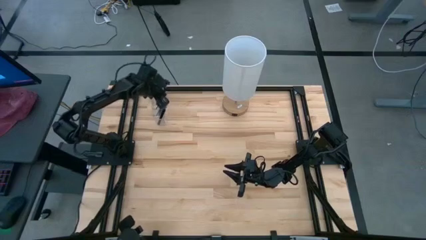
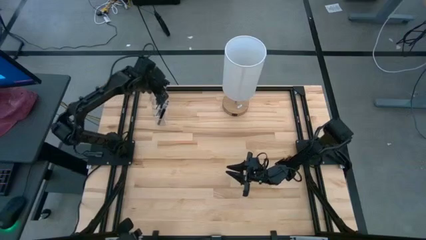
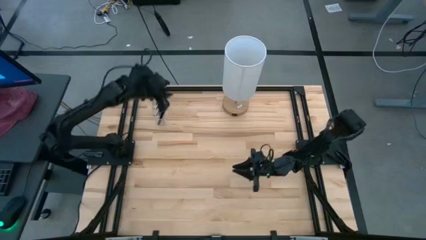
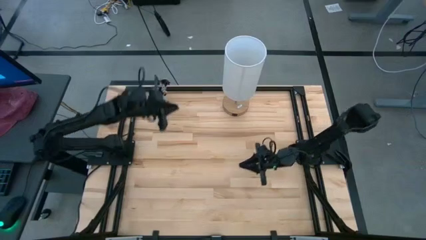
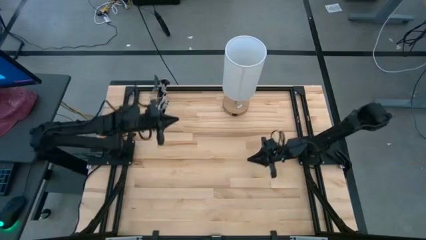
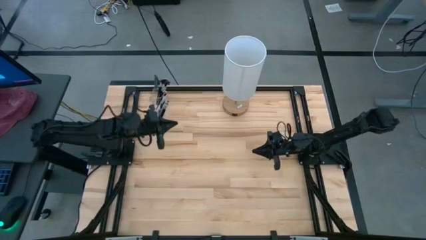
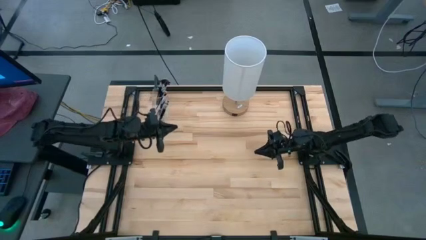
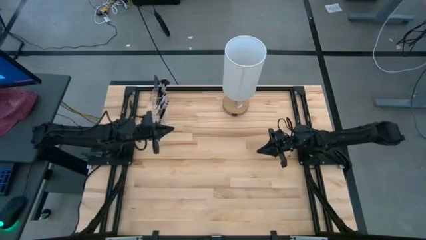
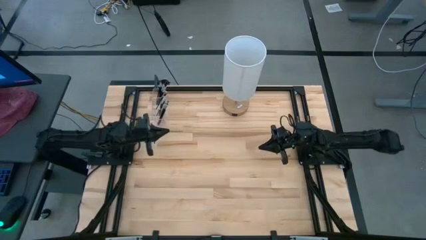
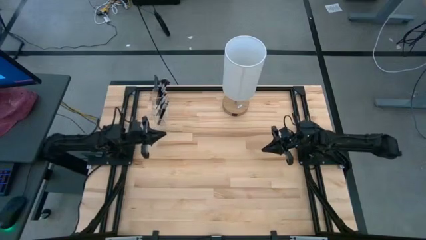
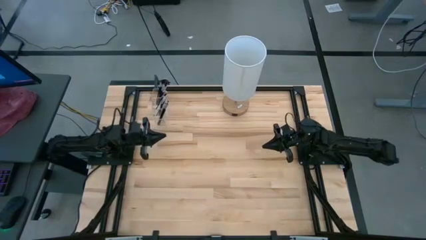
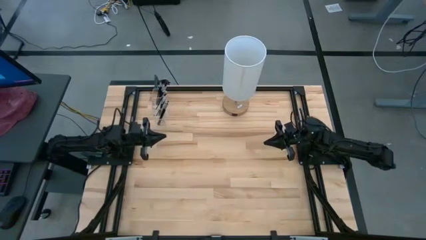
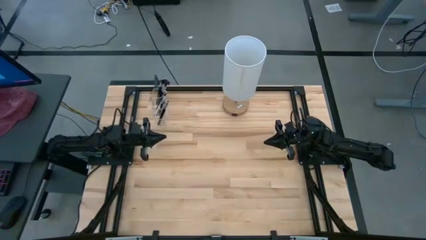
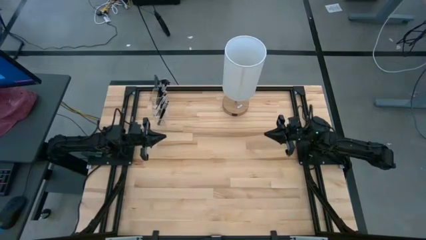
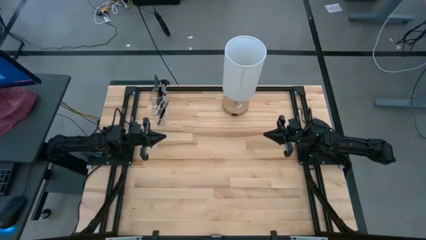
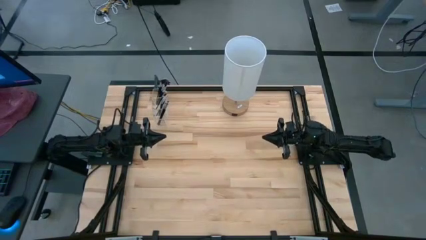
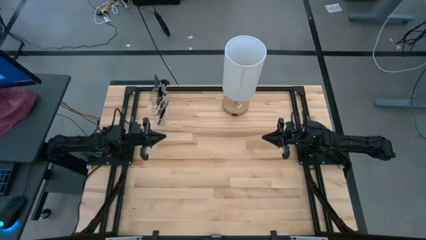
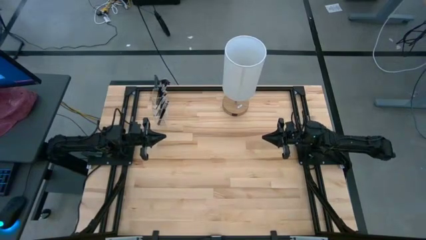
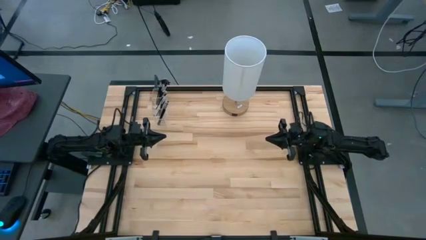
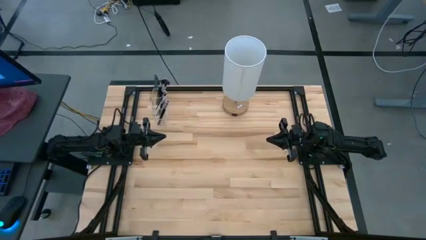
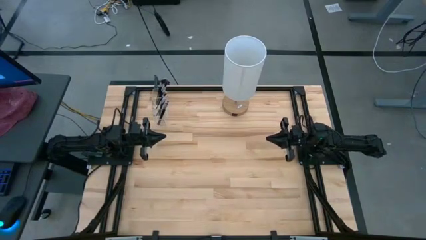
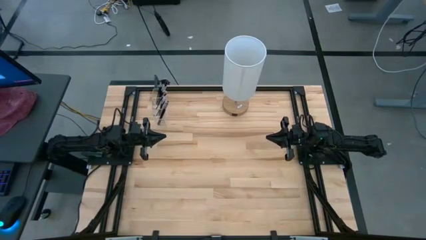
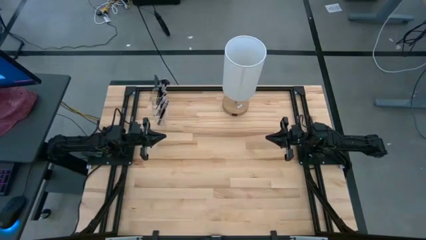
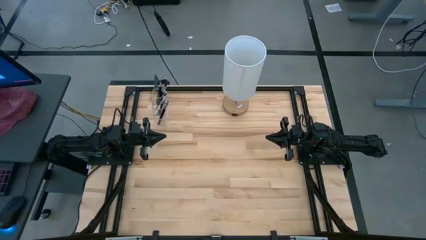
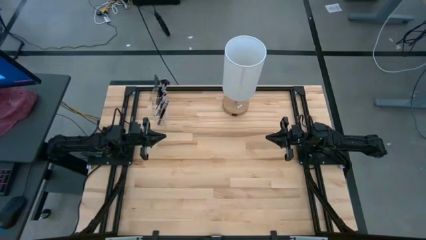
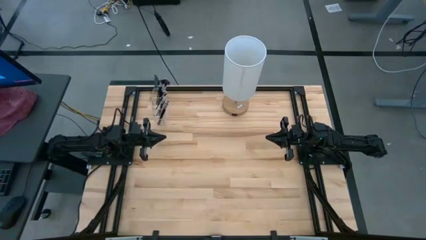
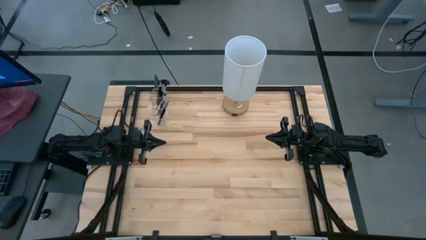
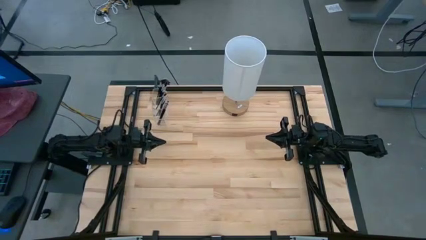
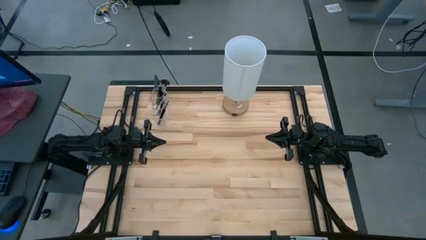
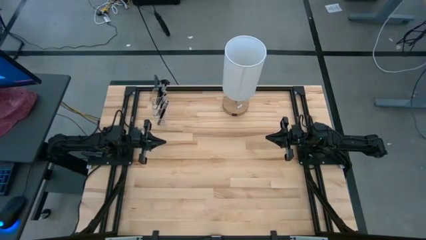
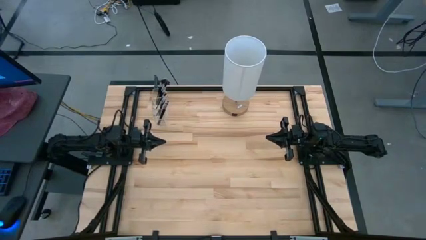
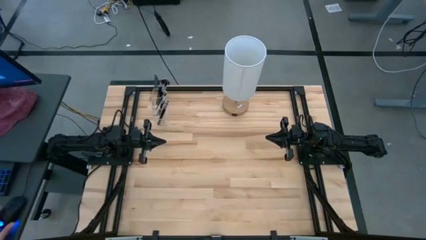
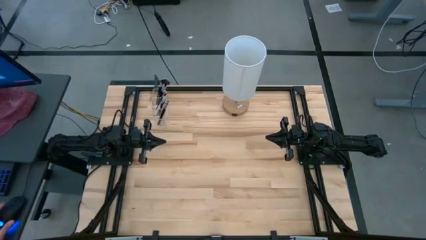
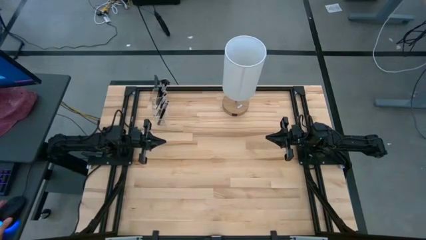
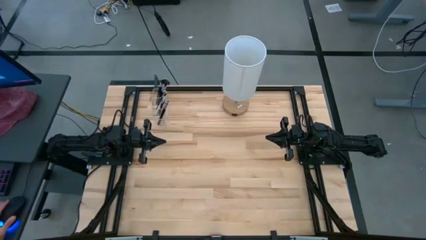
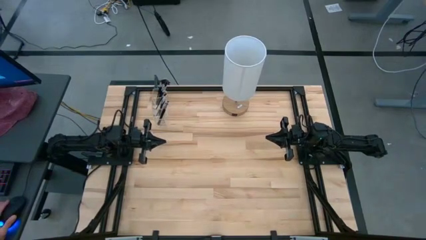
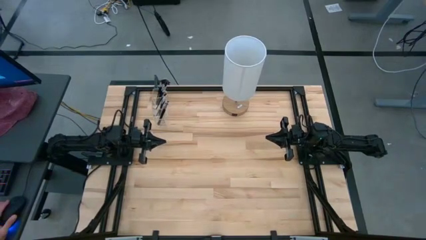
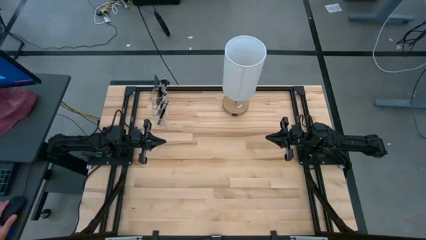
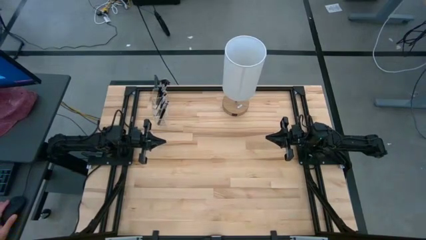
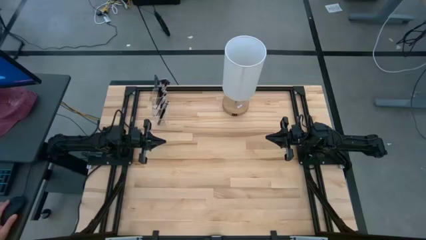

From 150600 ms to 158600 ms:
Task: Put items in baskets/containers
Return to Home Position

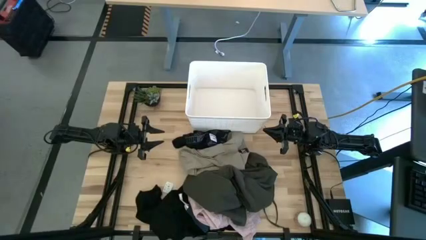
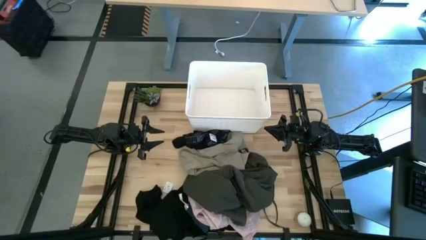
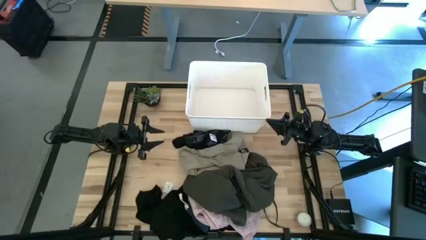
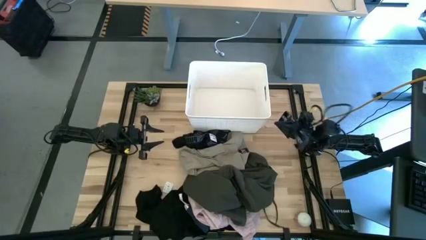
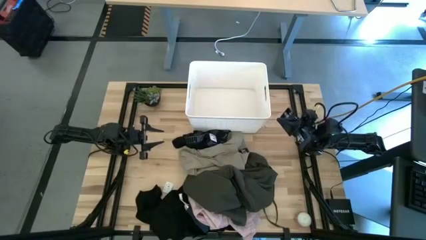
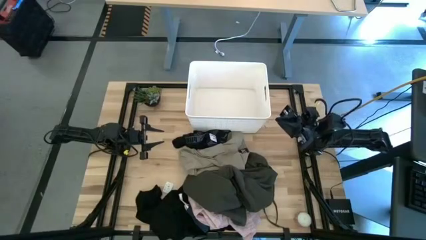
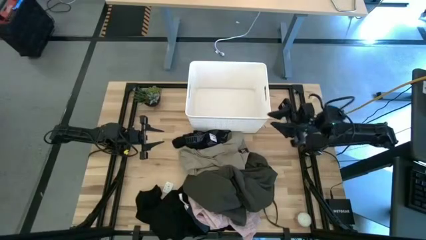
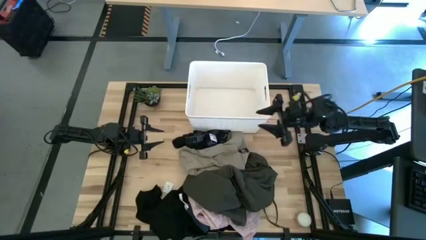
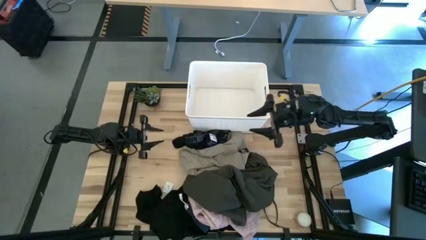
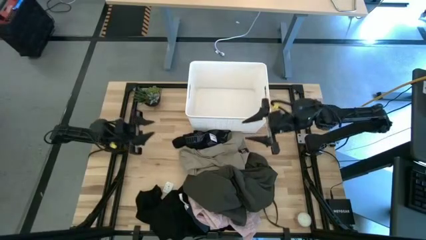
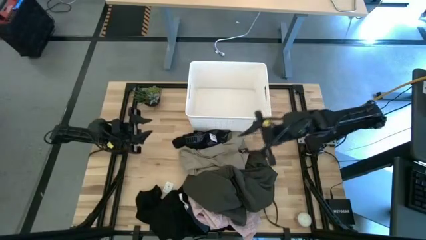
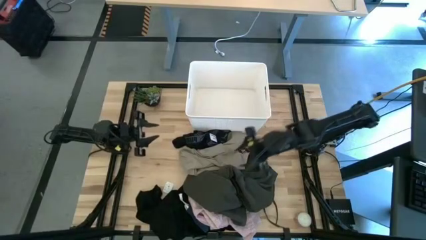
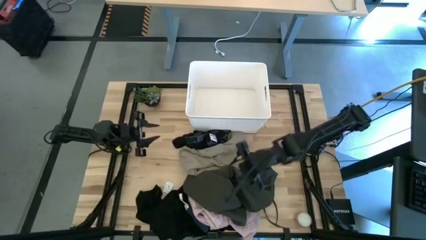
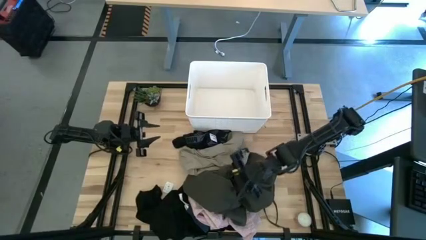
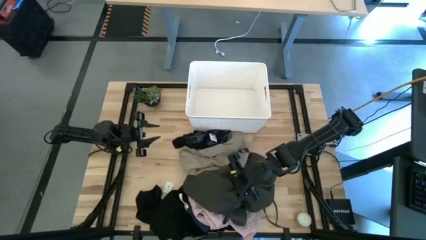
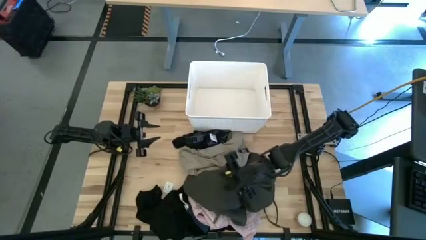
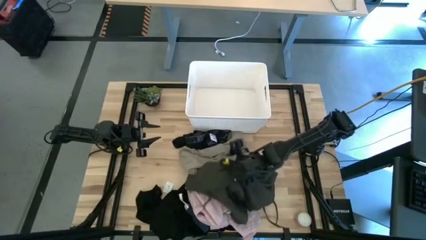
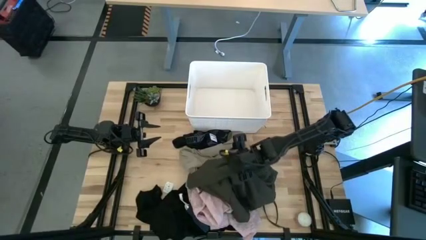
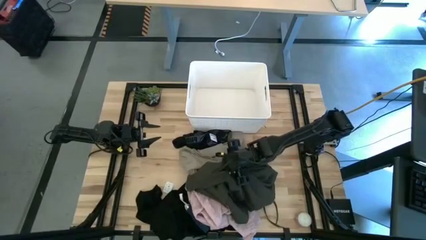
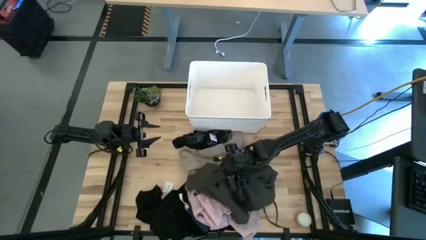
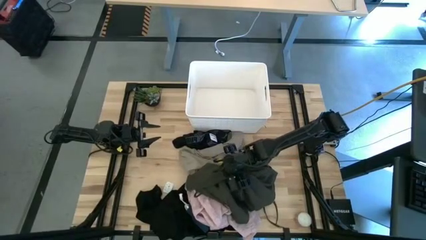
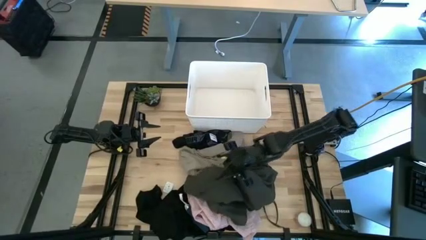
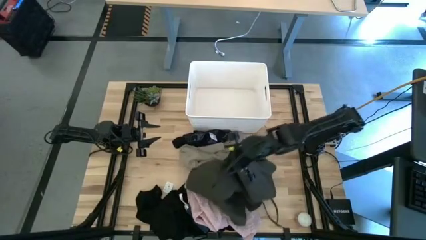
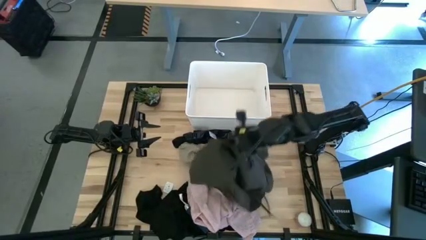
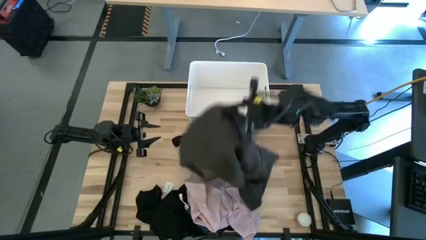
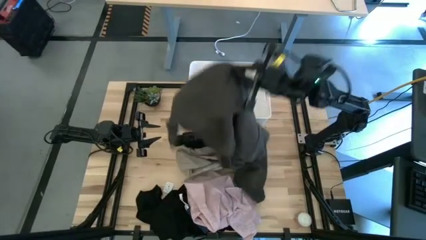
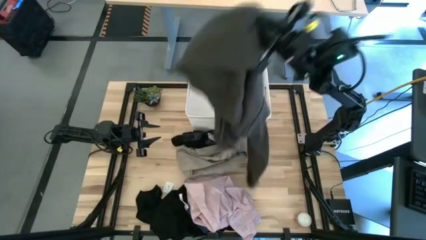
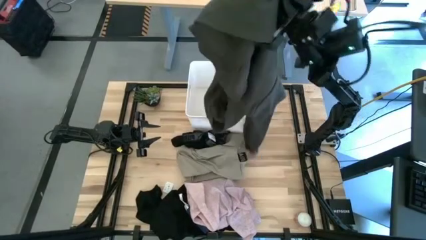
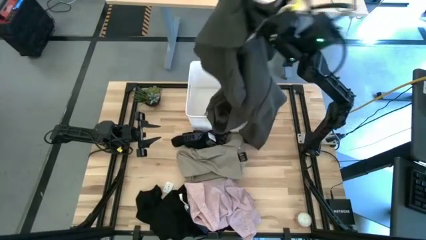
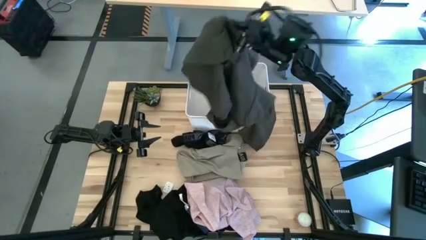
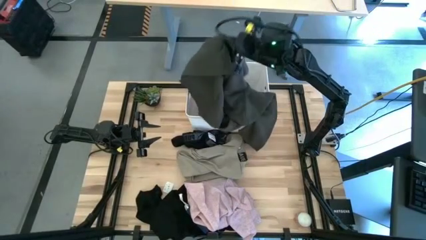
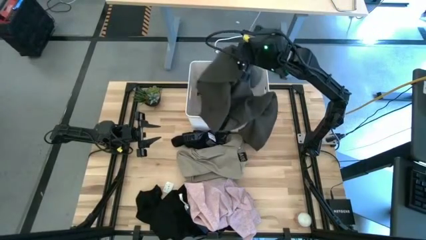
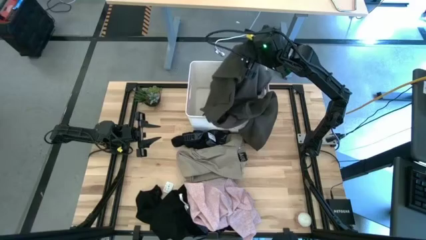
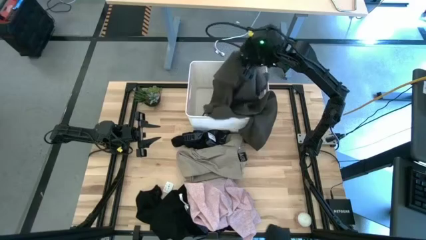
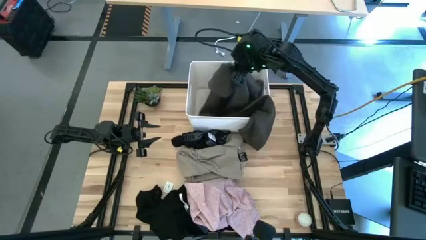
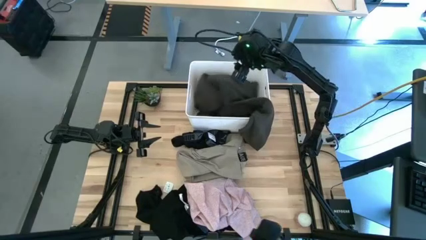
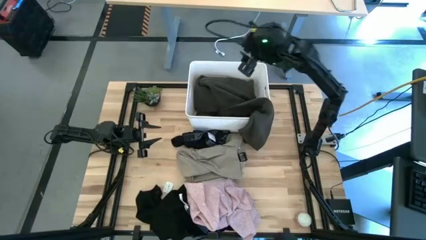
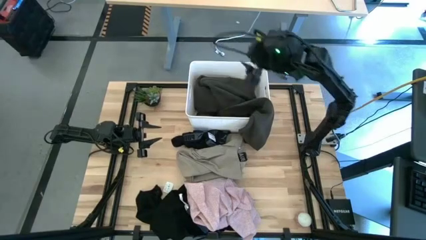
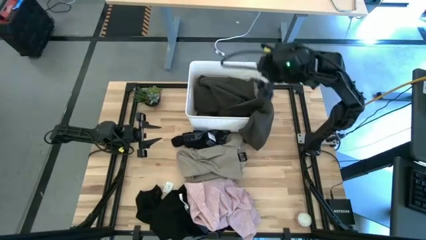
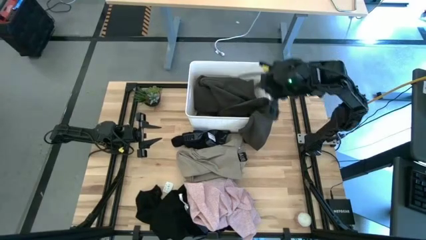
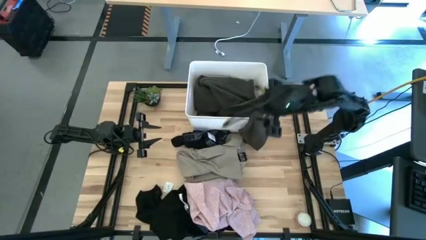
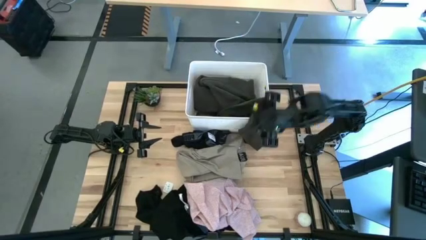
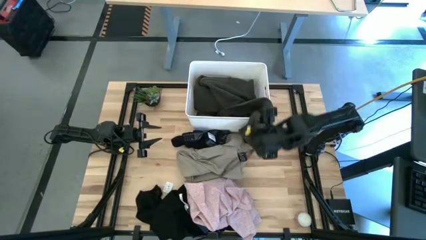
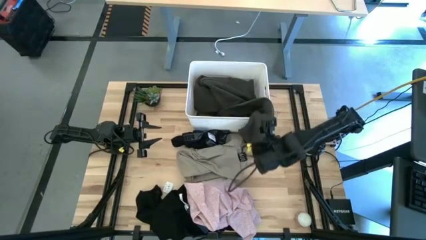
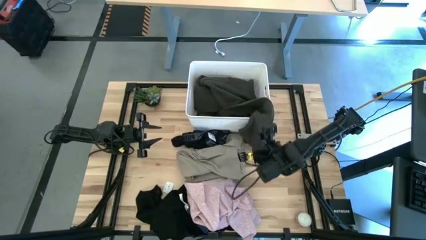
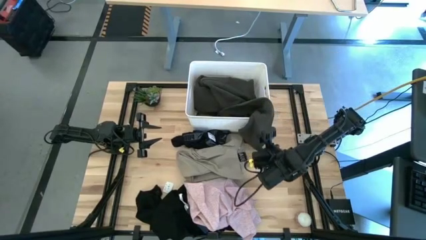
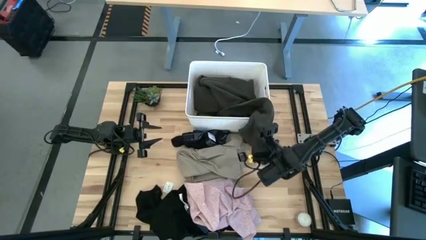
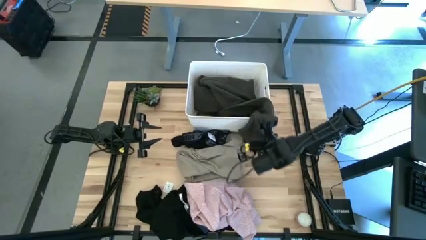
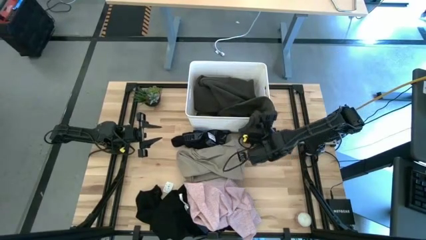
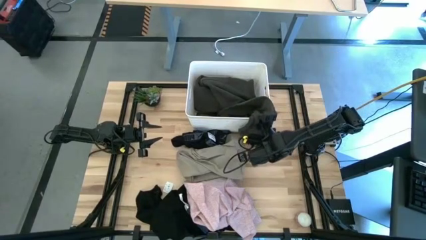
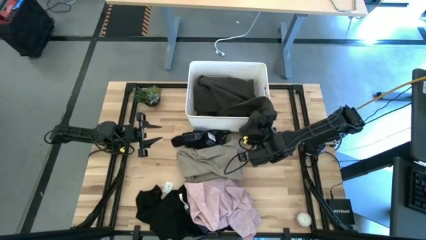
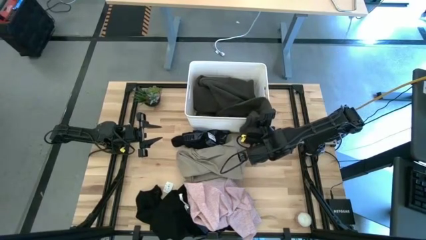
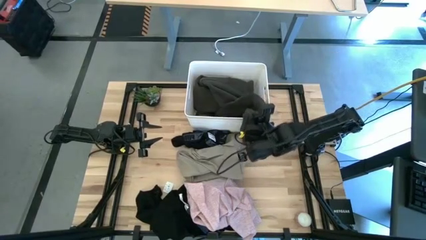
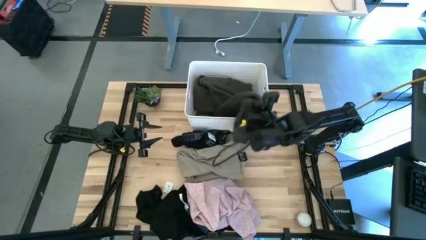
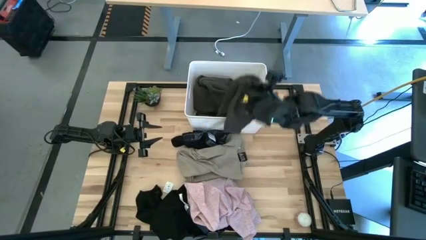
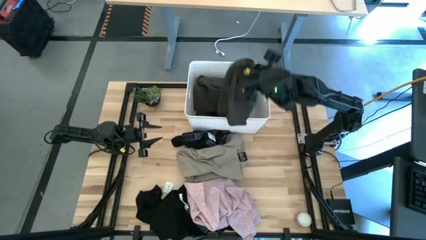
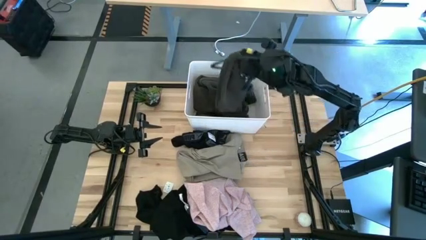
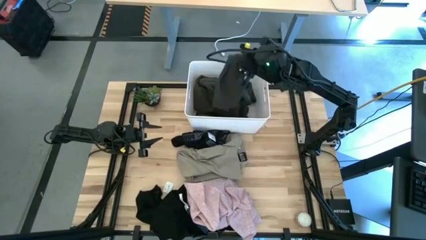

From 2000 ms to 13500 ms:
Task: Sort clothes
Put the gray wood jacket into the white laundry bin
